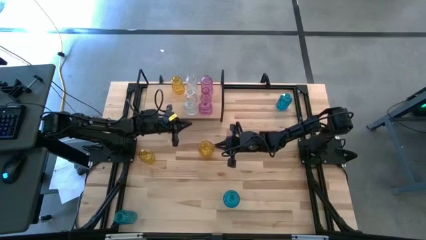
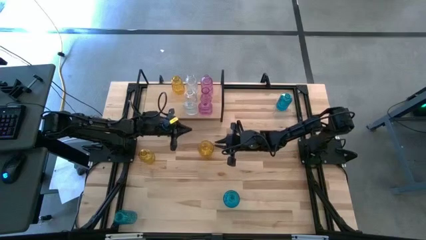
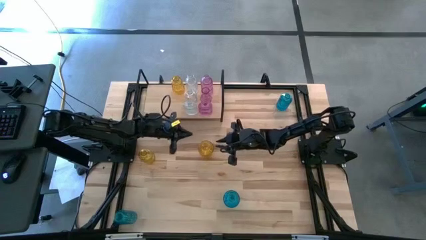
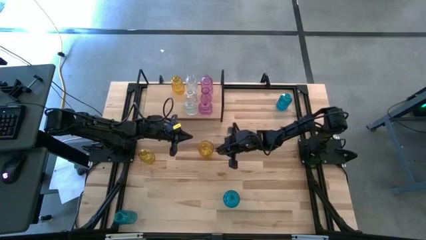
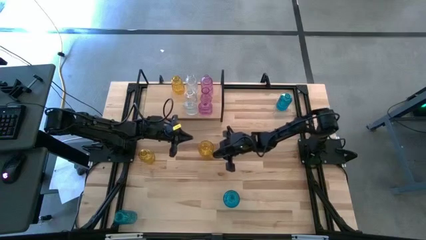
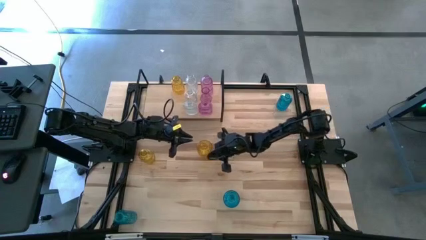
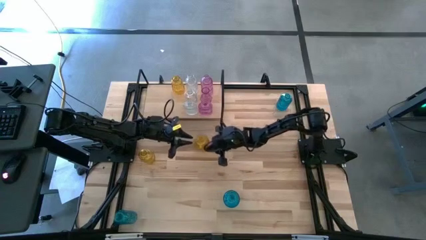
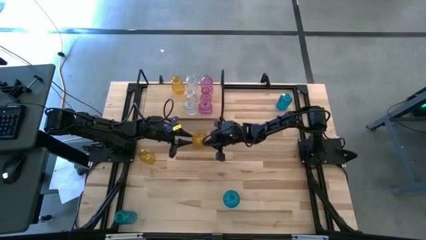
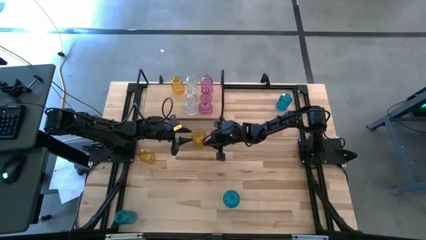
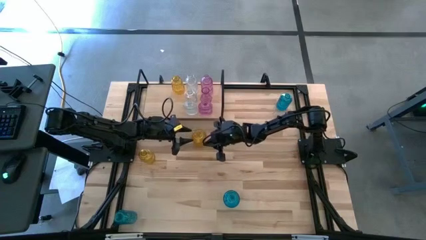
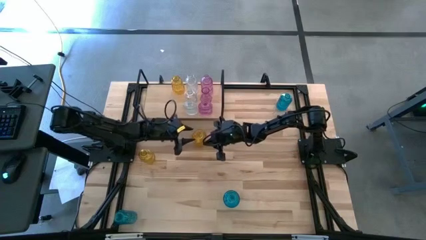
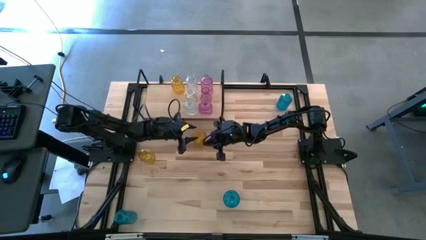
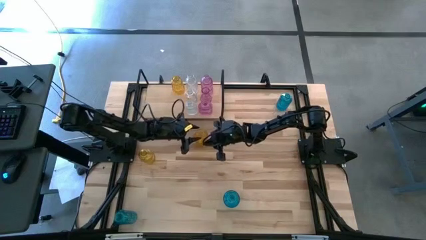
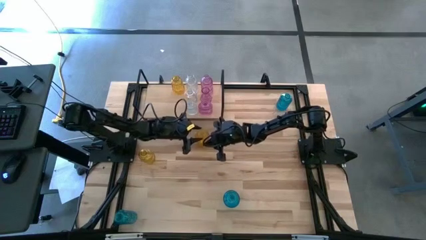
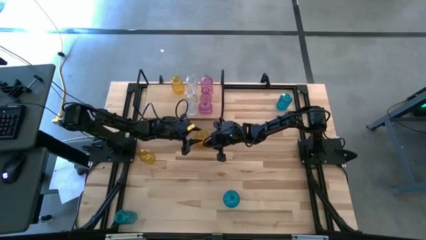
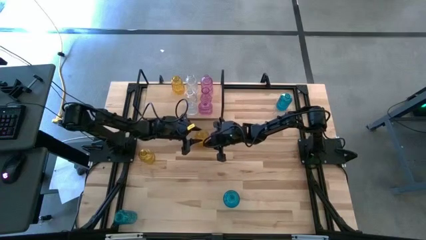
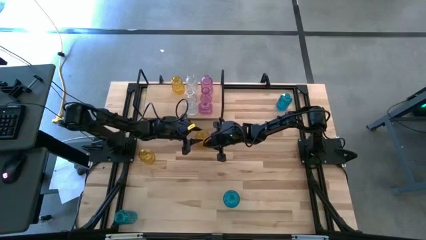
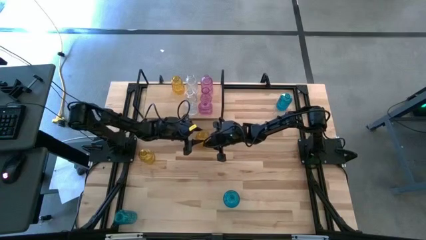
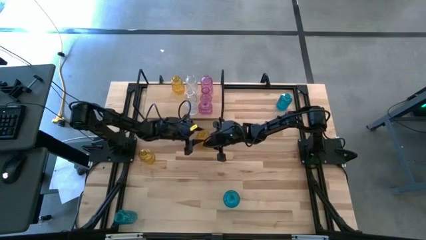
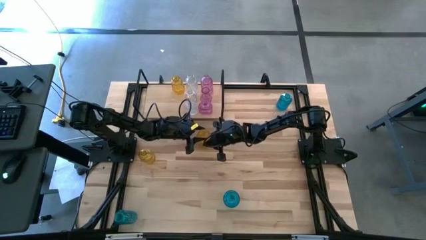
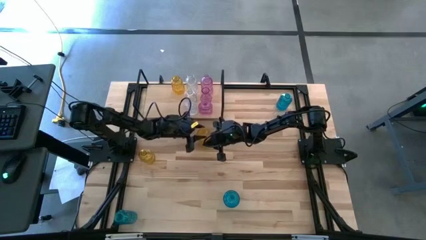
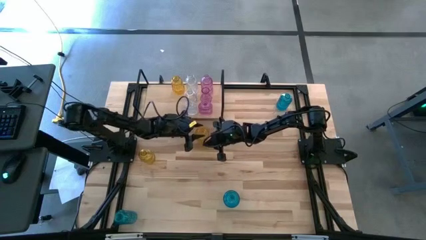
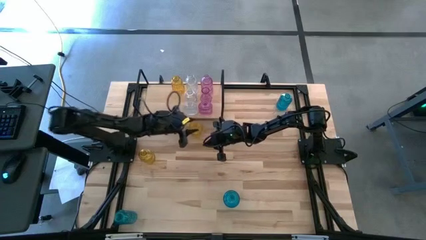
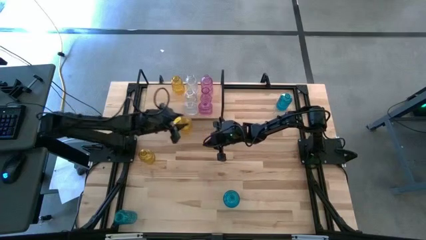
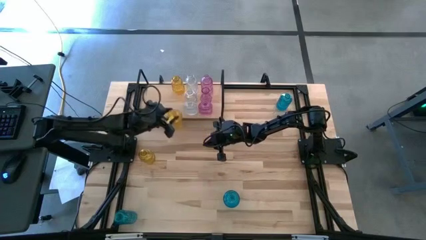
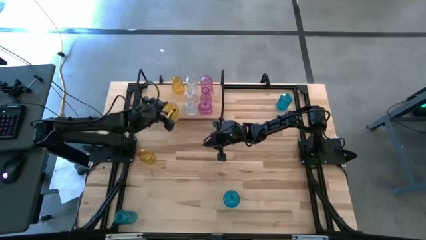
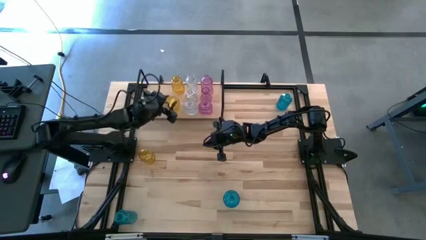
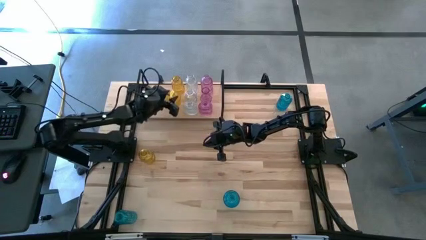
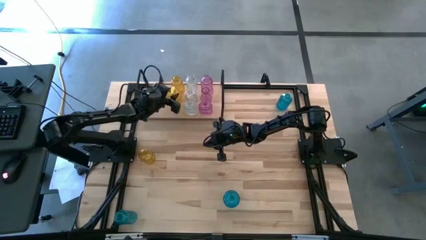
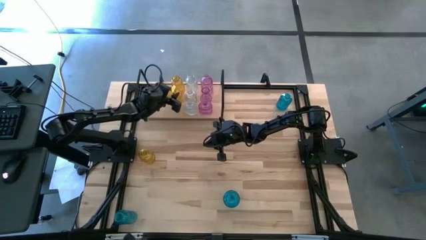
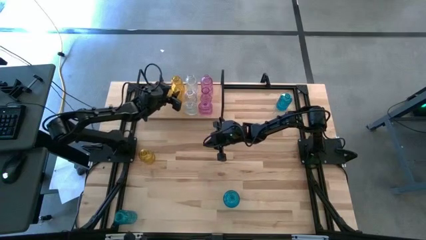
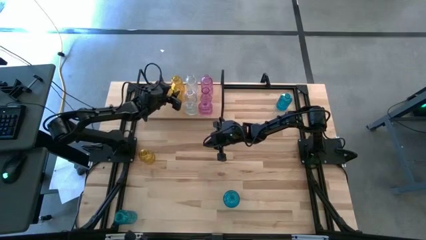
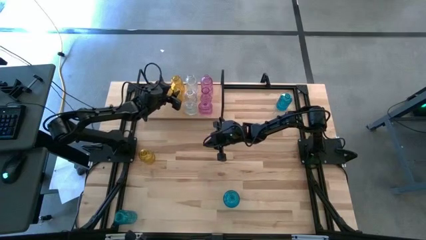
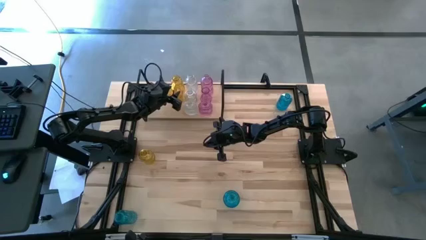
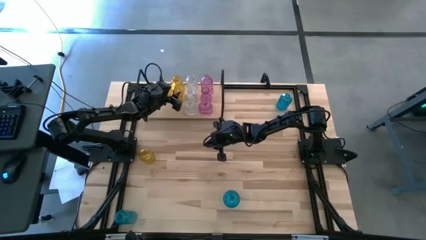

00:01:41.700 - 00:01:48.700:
Task: sort vases onto shelf
Put the right yellow vase on the shelf

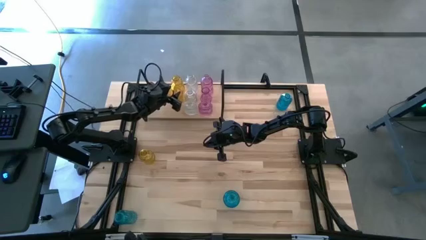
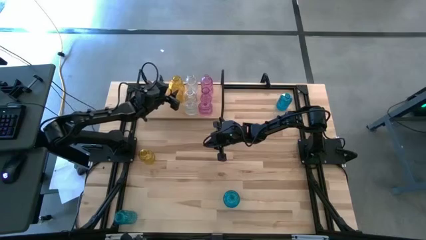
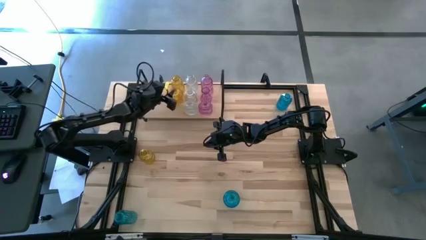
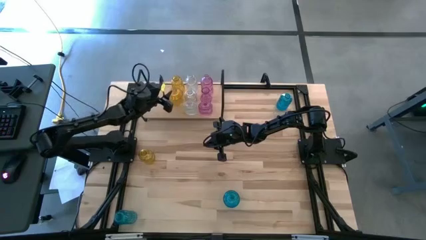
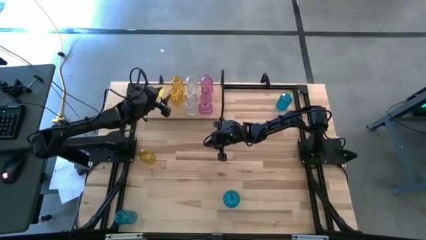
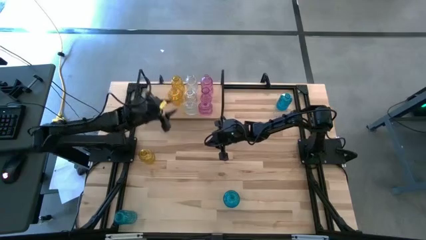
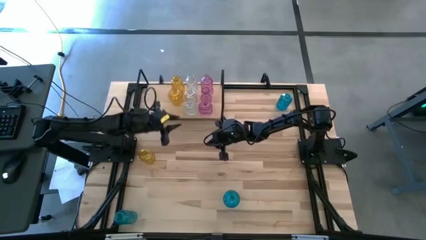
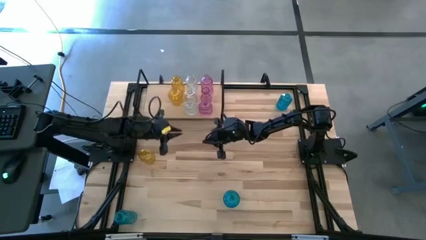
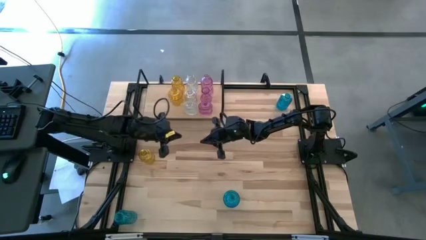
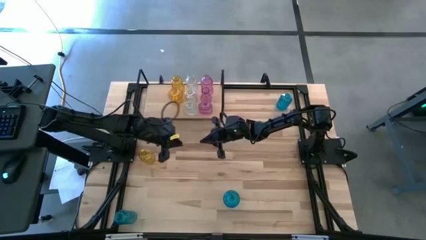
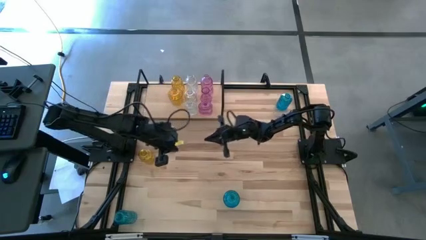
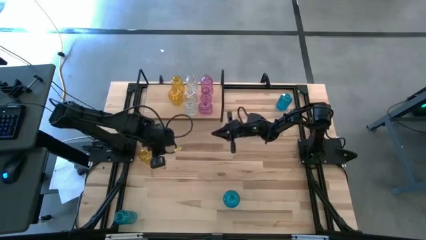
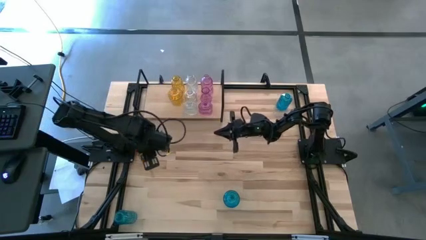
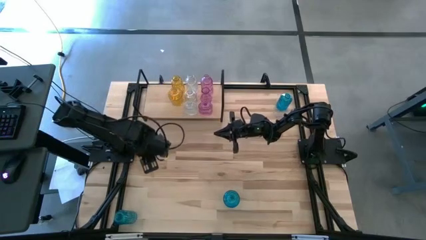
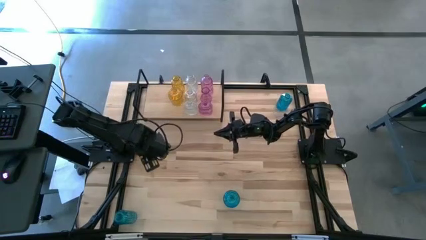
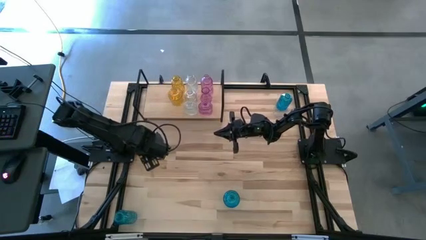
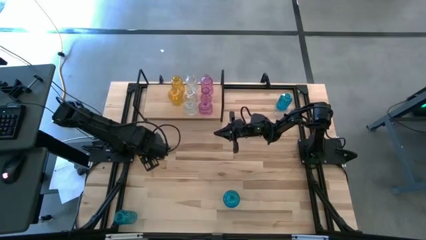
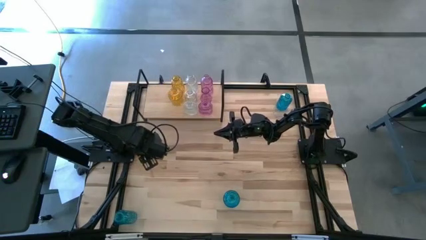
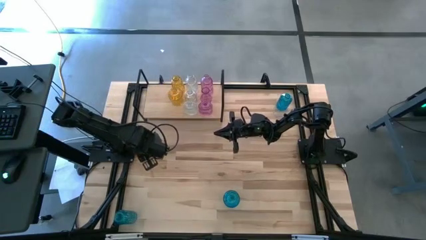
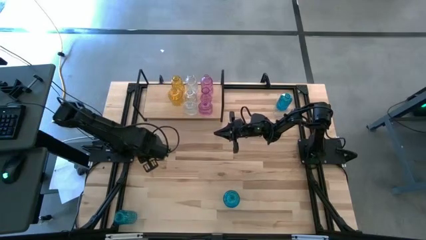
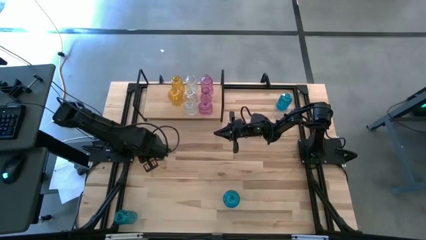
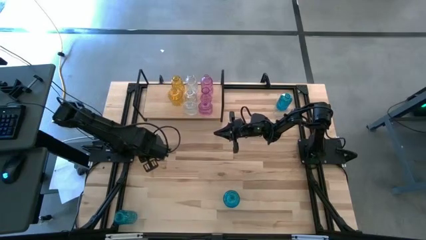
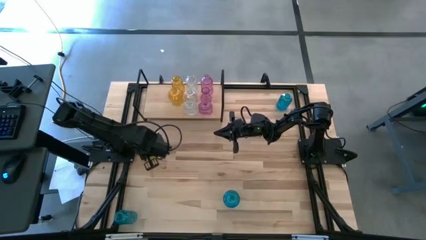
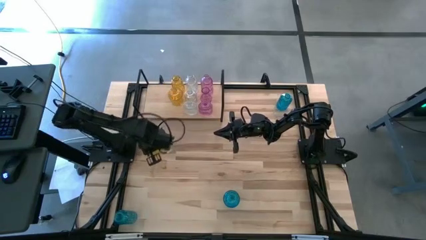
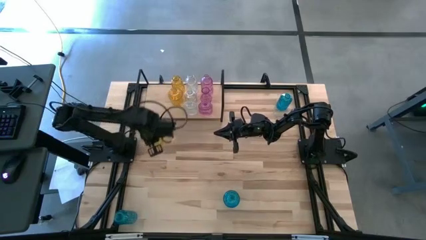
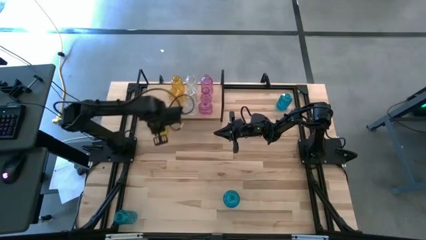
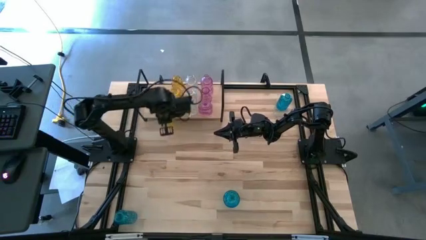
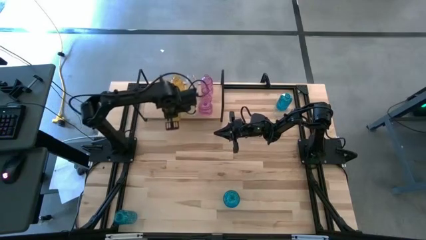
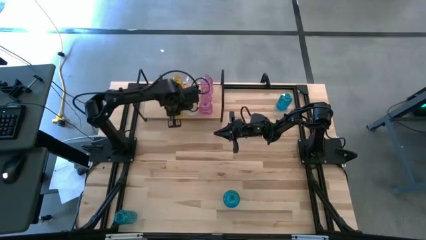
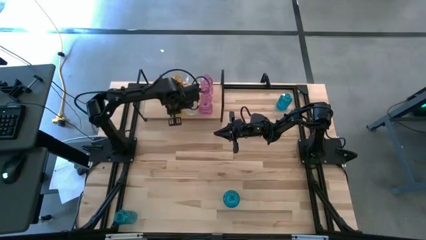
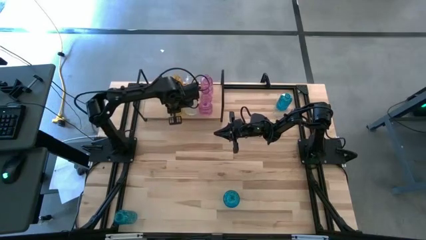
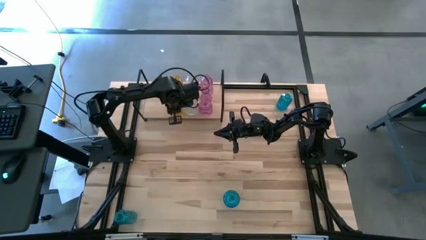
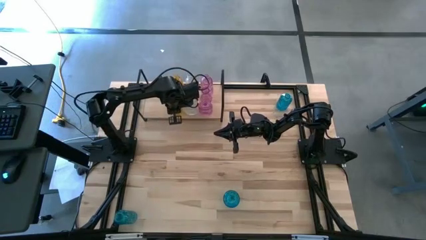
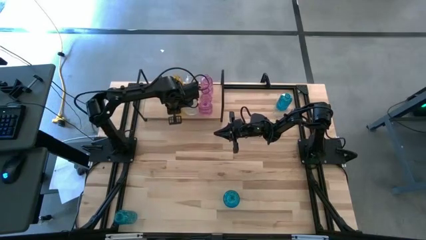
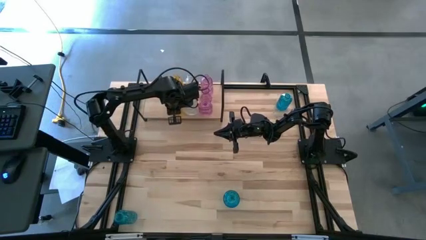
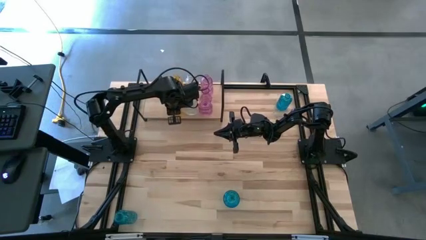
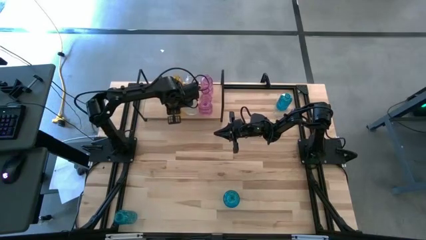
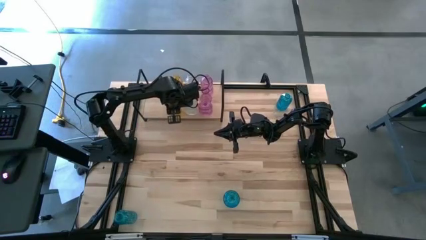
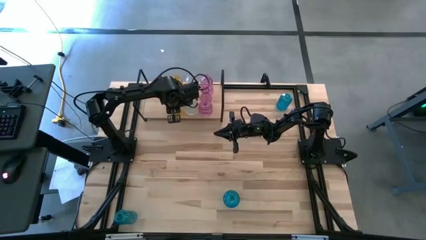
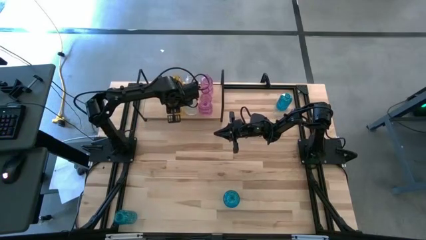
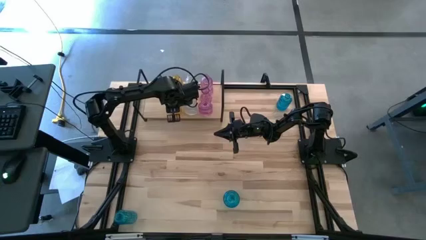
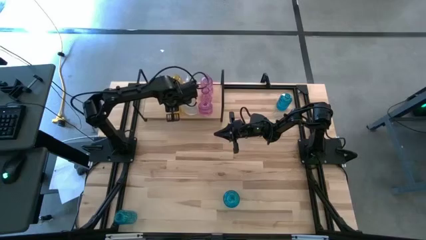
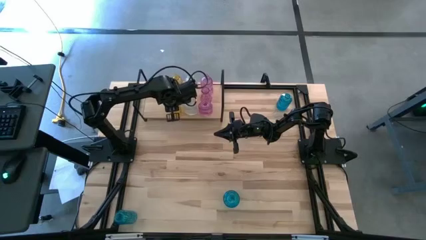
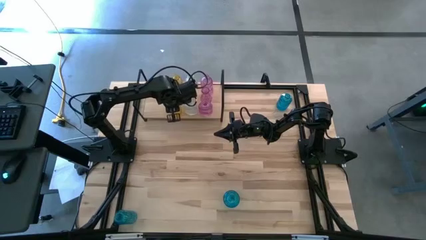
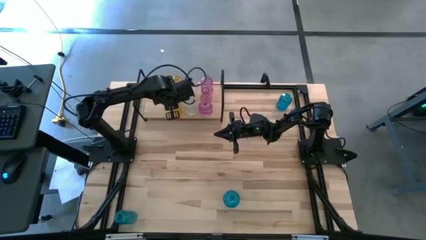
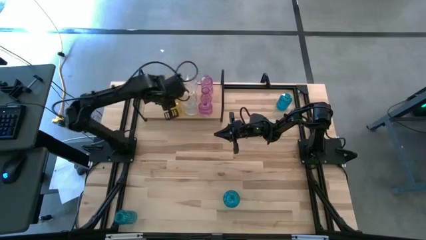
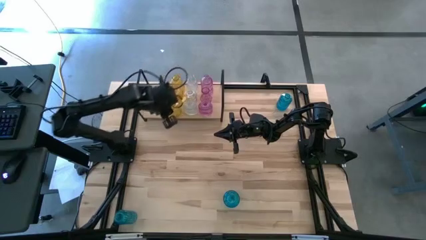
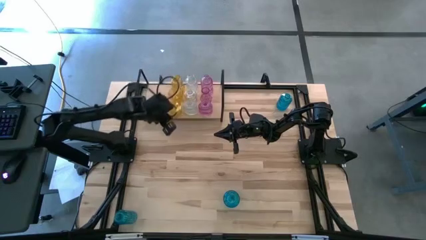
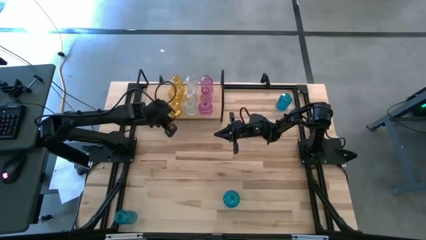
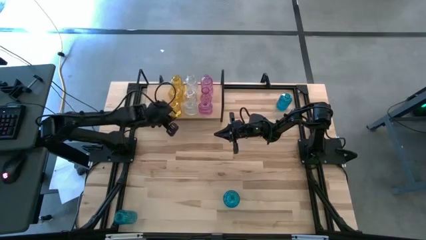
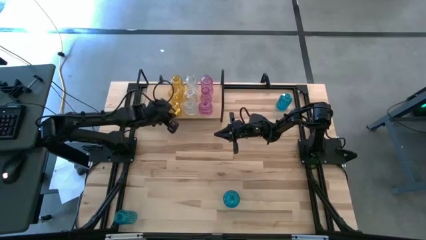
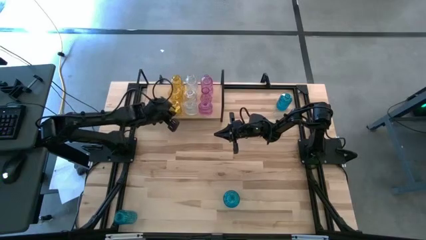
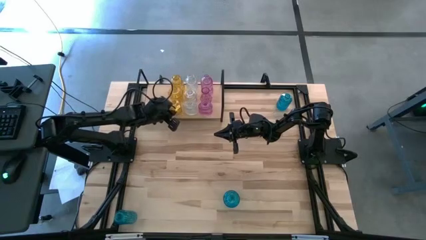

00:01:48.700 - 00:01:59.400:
Put the yellow vase on the shelf
